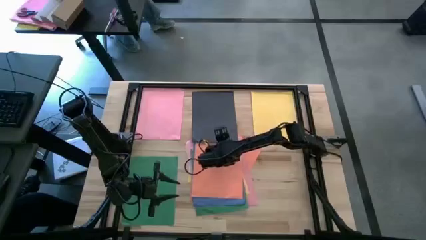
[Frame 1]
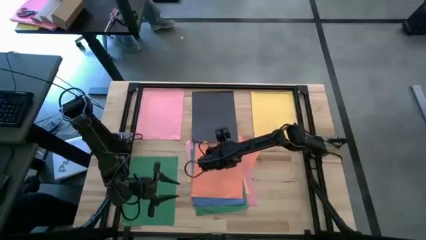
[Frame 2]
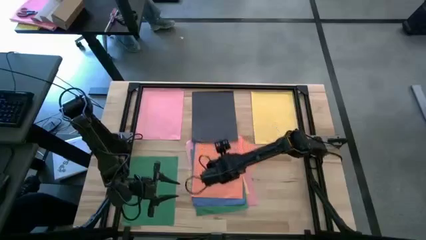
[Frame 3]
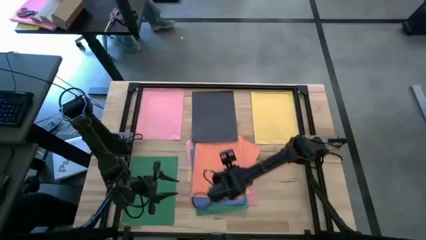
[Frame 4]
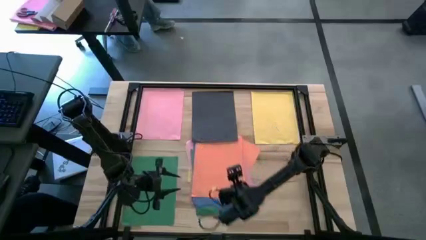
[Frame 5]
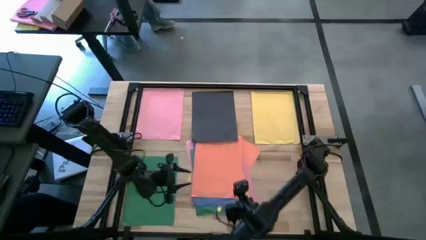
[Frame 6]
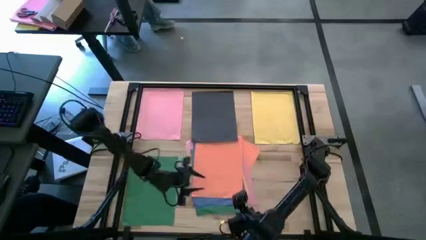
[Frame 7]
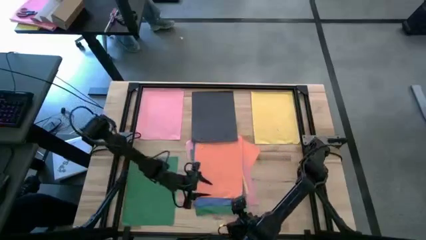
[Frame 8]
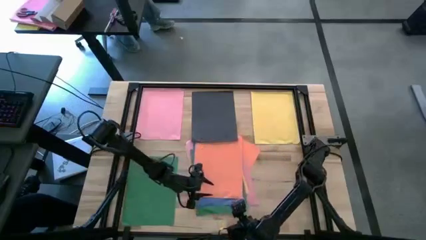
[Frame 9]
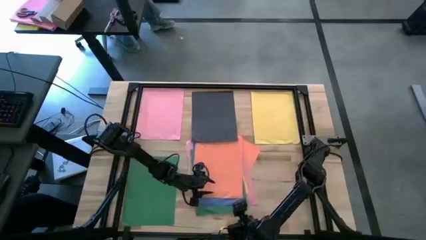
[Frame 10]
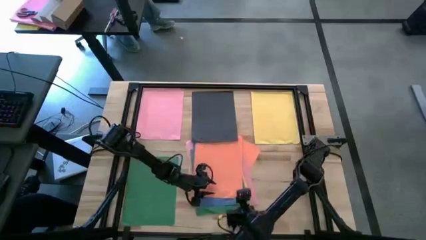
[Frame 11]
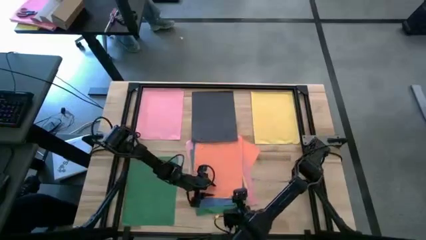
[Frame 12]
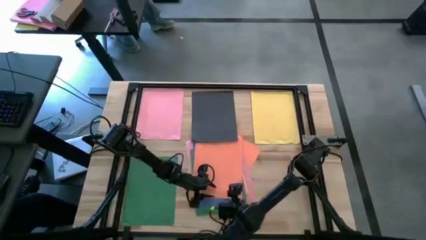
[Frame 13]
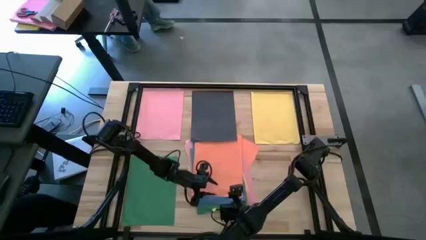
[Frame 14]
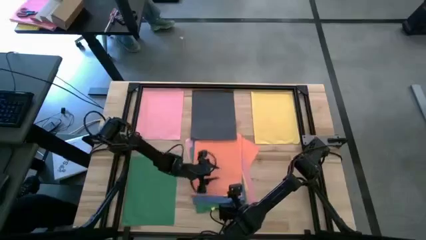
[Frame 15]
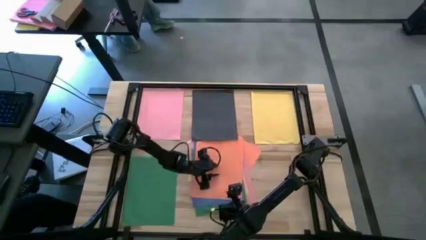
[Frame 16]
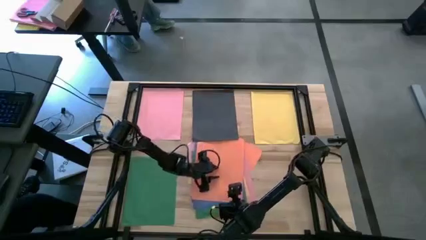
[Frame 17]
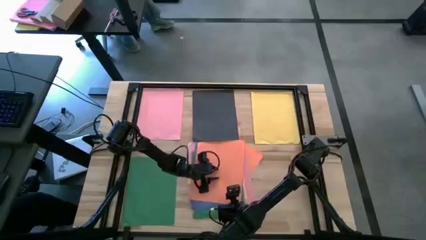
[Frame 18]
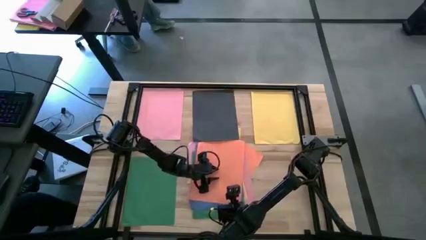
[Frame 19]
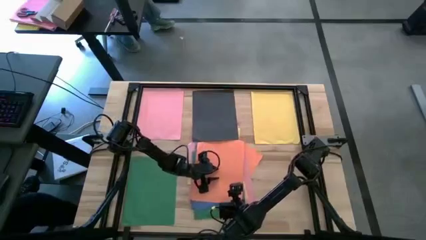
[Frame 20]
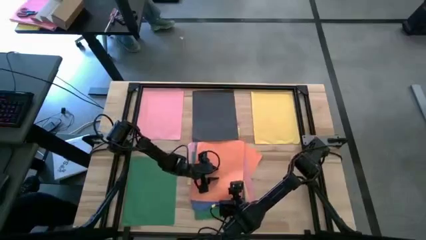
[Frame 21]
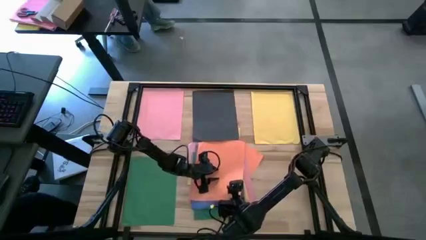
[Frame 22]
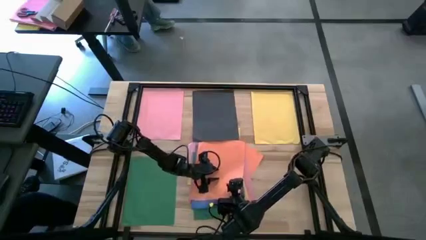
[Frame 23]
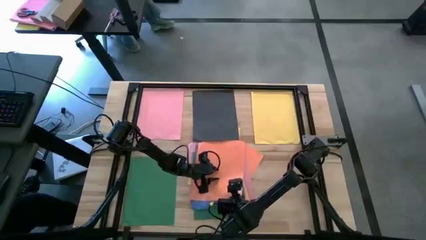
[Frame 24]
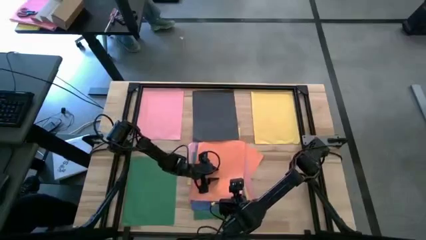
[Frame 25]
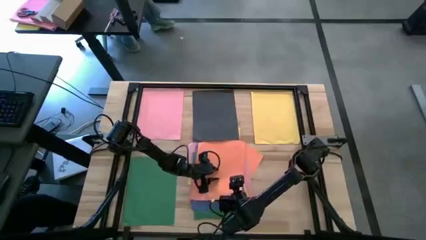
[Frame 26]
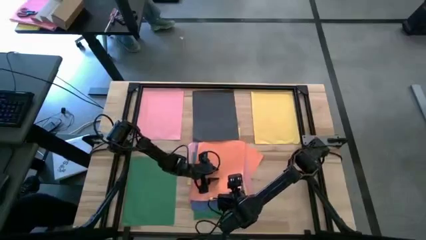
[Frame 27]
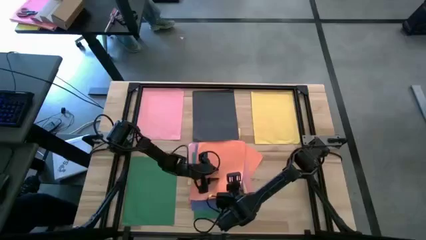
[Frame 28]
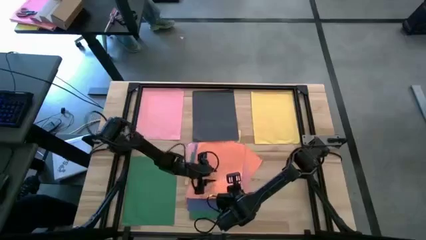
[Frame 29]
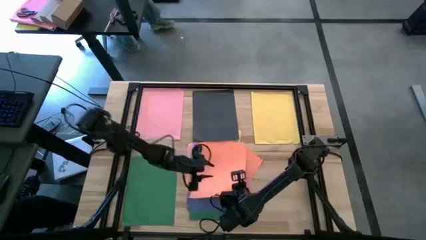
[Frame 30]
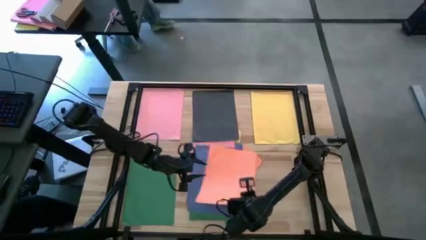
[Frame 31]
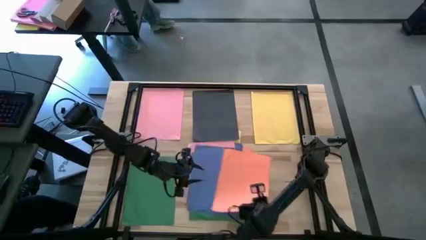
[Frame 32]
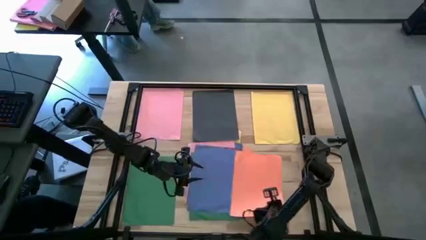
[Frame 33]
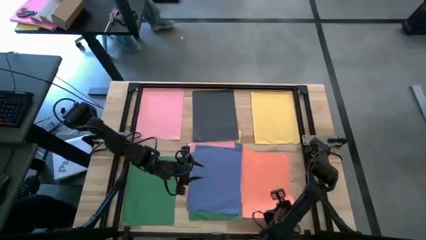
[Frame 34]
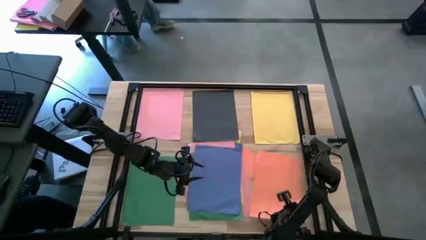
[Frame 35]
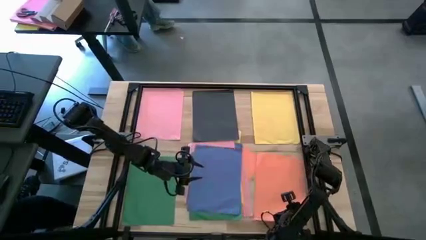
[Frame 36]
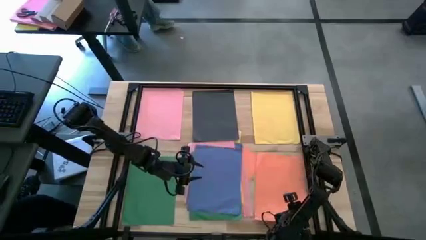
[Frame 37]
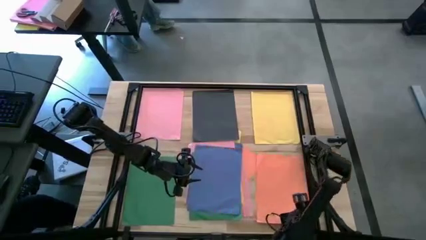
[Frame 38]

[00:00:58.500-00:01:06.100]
Task: Organize paper
Move the orange color paper to the bottom right of the table

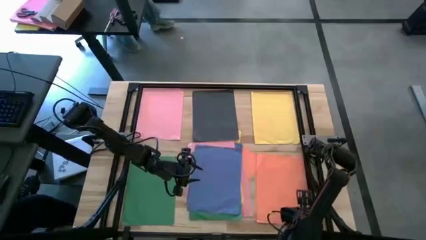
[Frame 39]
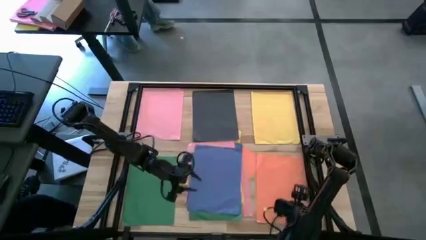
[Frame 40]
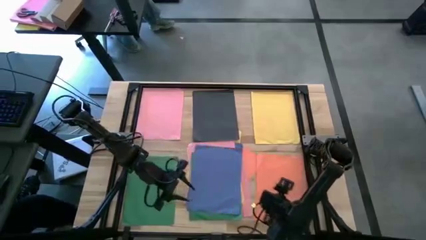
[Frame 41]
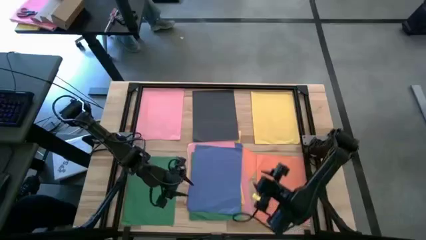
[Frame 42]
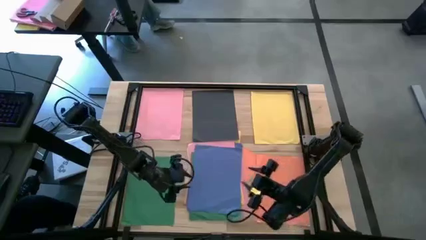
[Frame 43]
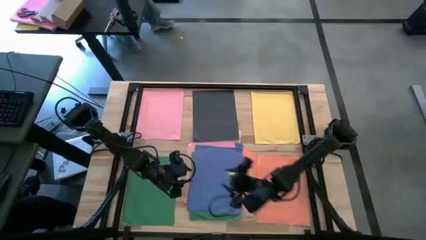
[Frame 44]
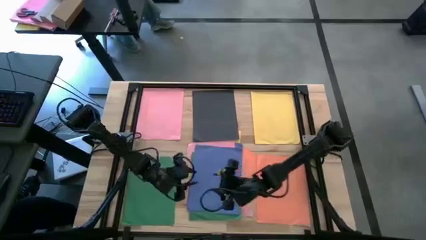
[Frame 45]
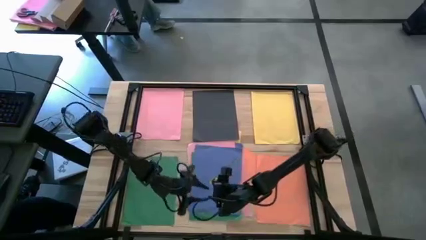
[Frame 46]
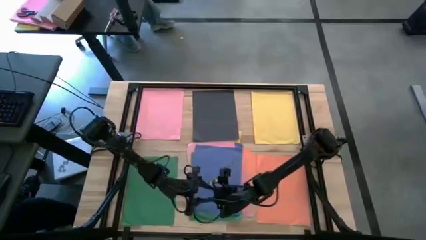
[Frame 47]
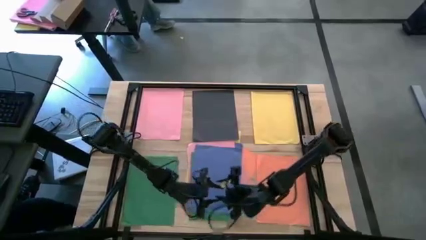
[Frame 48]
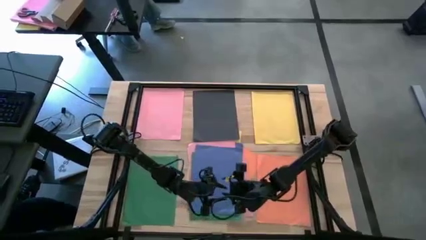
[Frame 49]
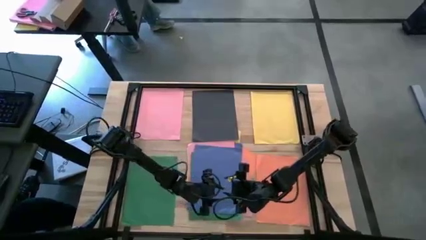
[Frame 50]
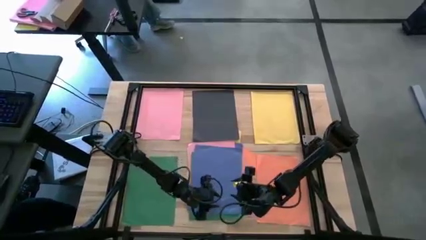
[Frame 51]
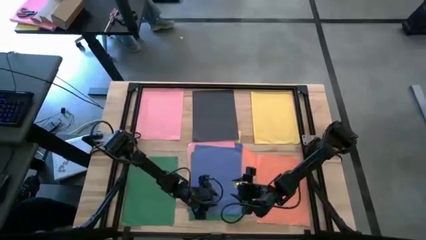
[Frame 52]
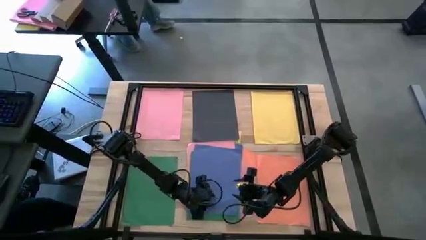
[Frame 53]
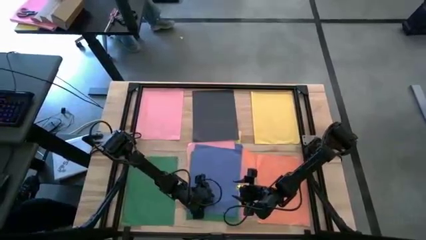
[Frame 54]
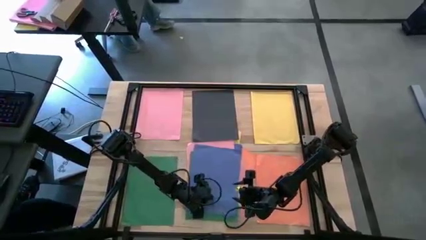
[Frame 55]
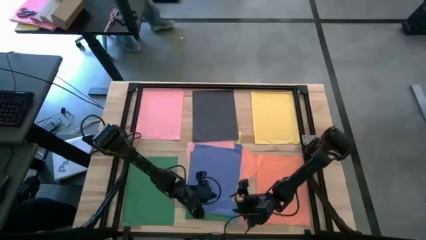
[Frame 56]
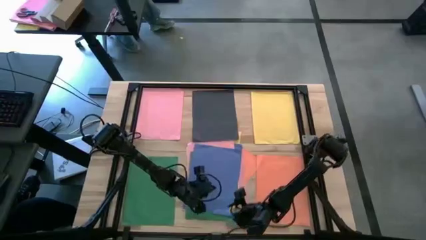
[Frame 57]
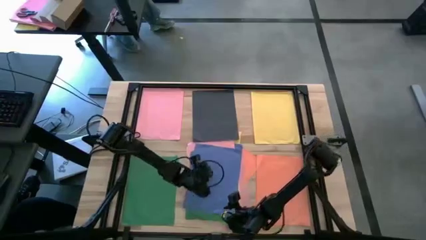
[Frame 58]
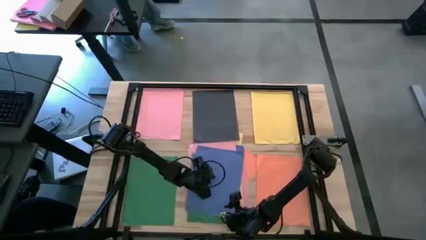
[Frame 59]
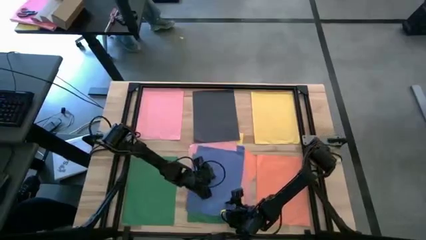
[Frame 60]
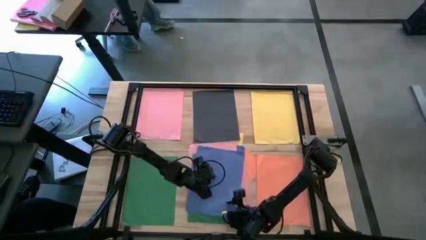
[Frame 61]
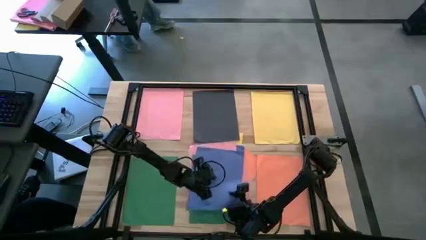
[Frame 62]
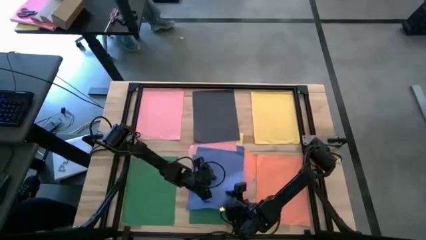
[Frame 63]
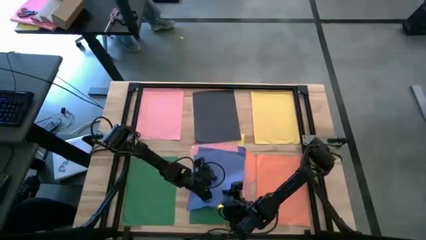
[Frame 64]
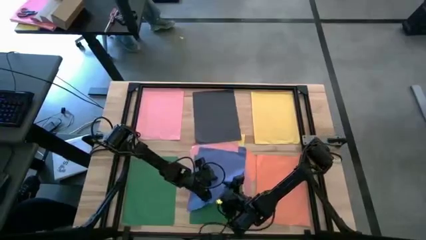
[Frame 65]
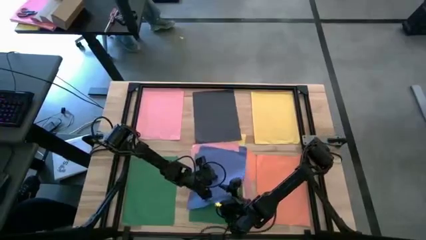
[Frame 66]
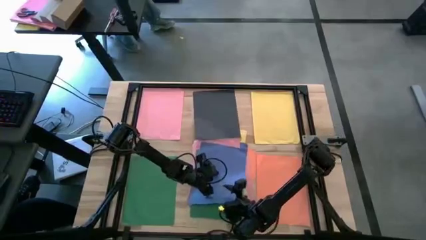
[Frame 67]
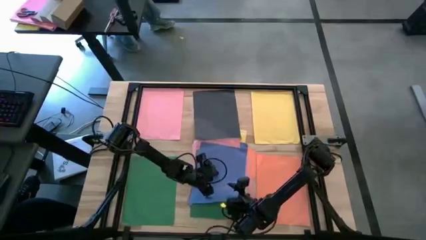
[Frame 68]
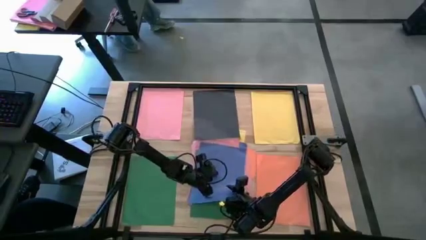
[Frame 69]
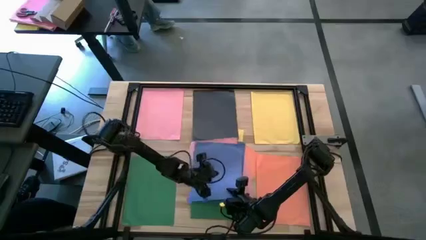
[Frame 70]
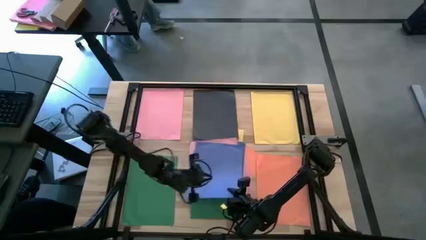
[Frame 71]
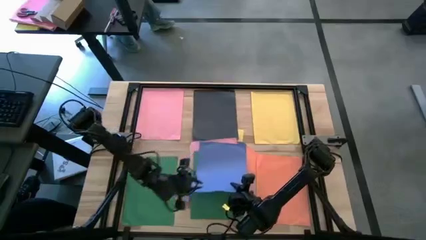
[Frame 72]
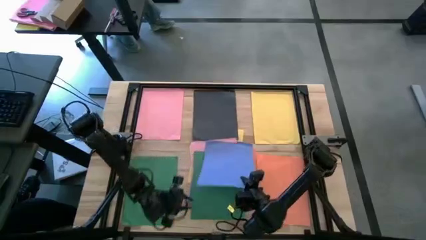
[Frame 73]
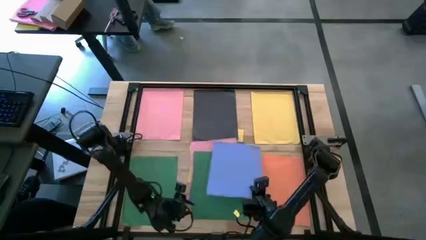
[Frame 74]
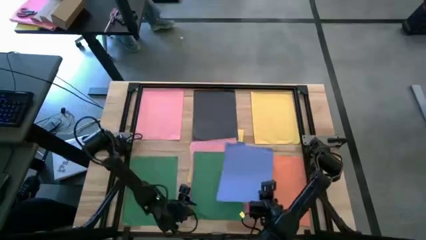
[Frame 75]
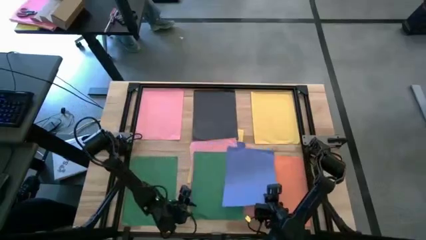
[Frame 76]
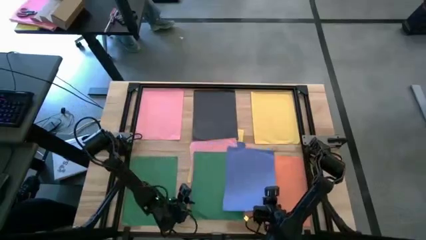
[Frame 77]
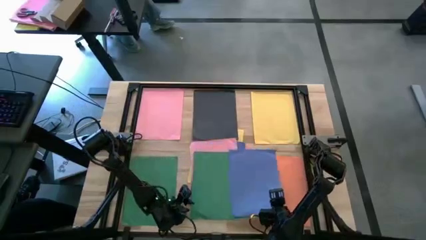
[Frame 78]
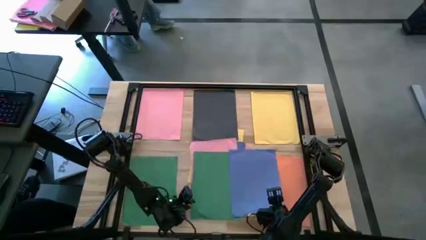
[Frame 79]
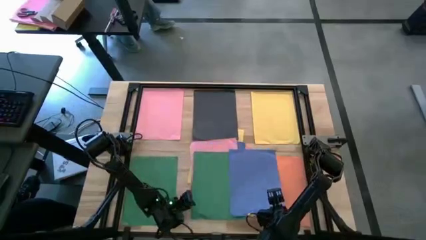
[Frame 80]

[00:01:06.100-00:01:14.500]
Adjust the purple color paper
